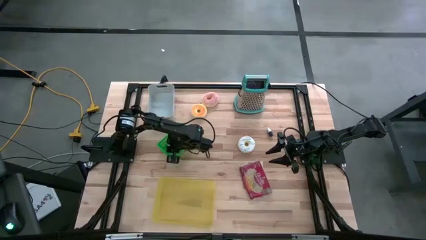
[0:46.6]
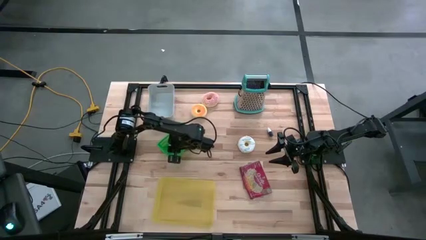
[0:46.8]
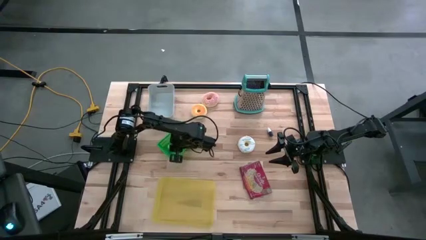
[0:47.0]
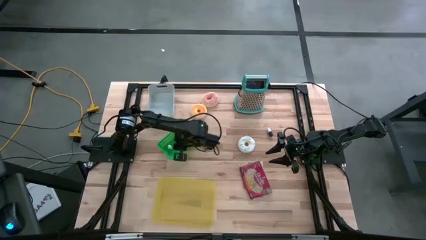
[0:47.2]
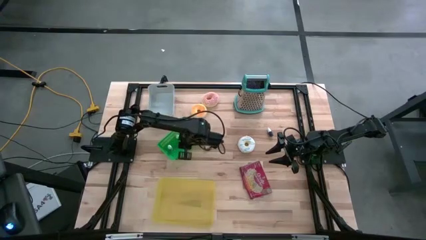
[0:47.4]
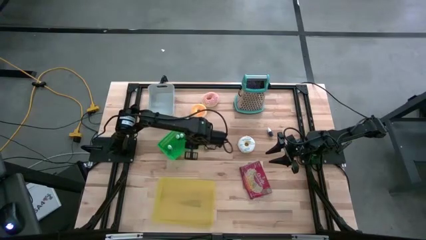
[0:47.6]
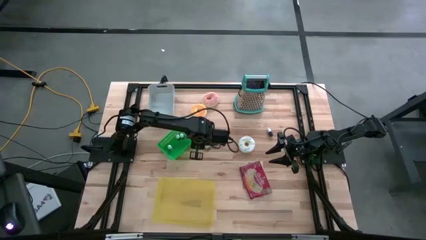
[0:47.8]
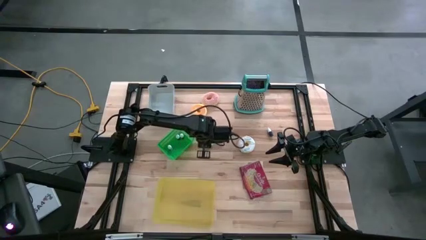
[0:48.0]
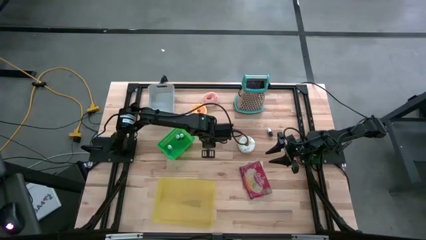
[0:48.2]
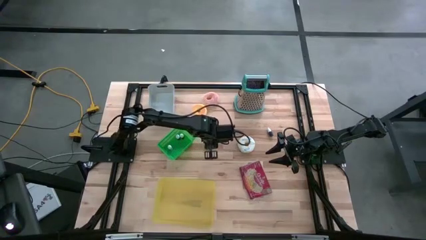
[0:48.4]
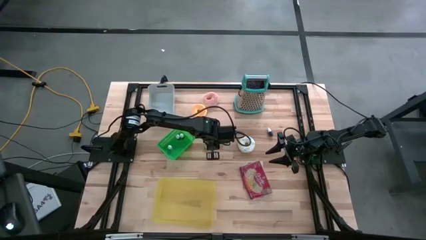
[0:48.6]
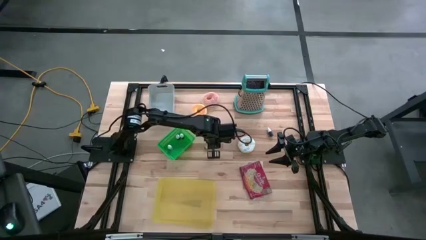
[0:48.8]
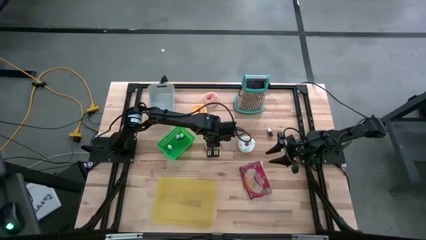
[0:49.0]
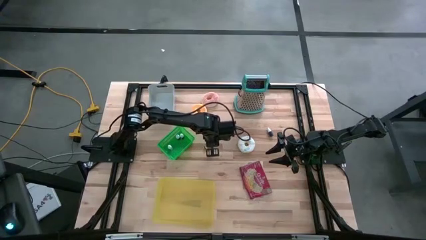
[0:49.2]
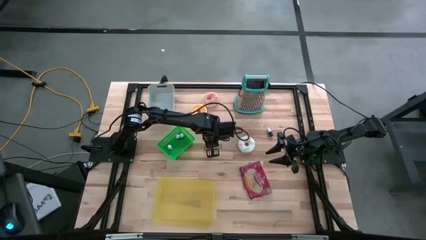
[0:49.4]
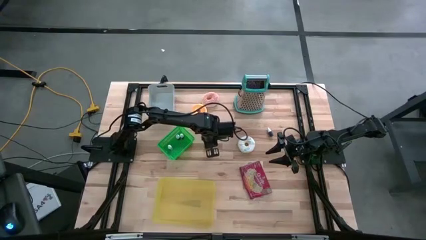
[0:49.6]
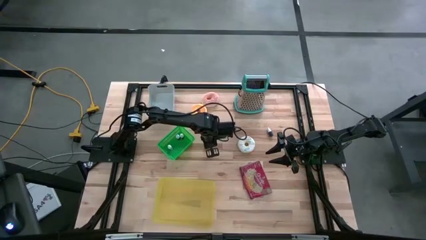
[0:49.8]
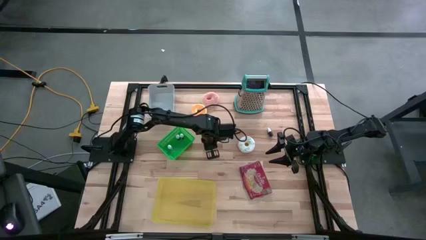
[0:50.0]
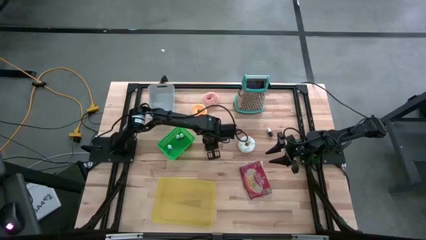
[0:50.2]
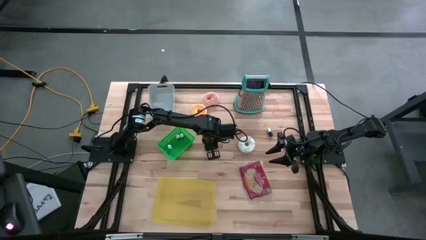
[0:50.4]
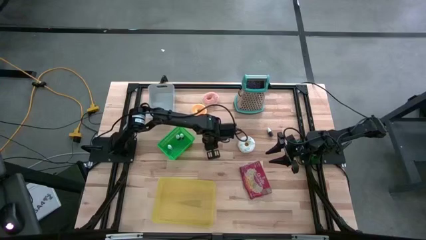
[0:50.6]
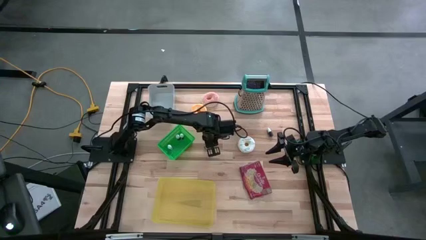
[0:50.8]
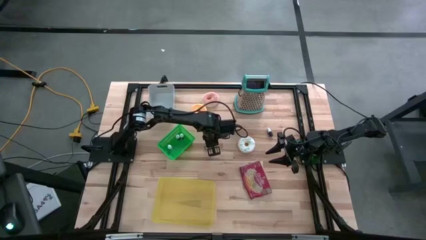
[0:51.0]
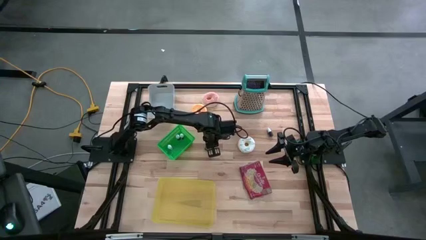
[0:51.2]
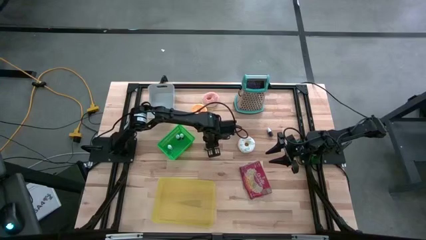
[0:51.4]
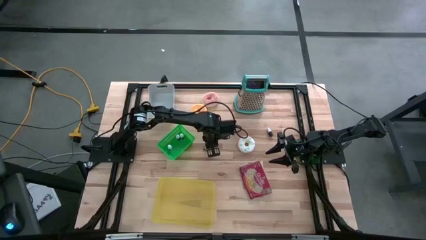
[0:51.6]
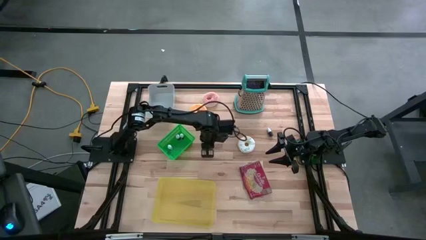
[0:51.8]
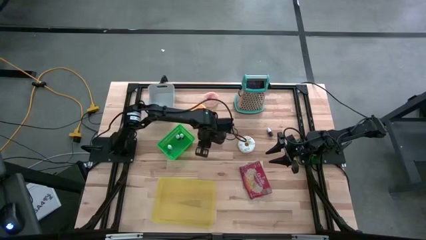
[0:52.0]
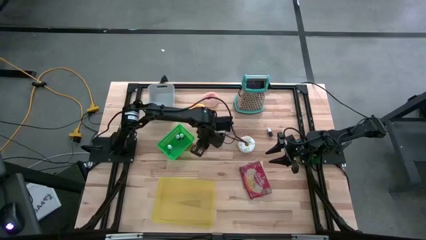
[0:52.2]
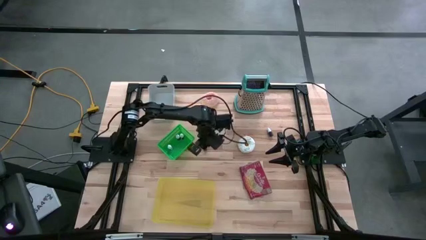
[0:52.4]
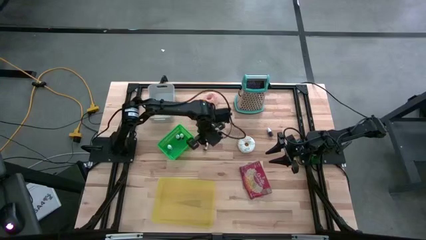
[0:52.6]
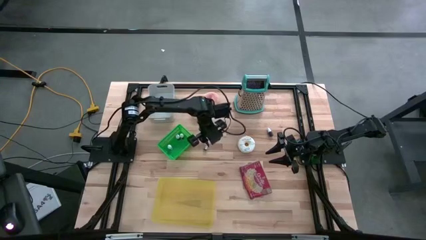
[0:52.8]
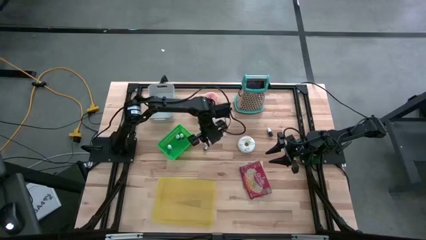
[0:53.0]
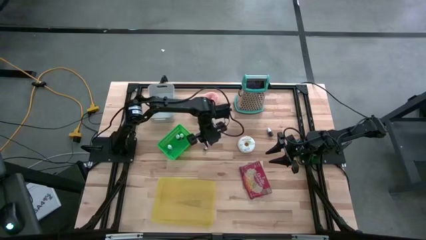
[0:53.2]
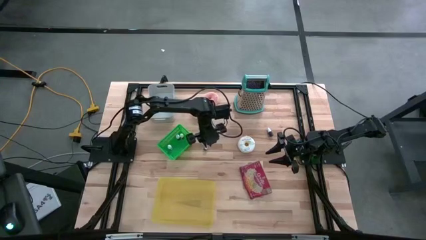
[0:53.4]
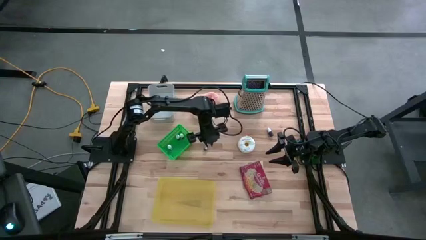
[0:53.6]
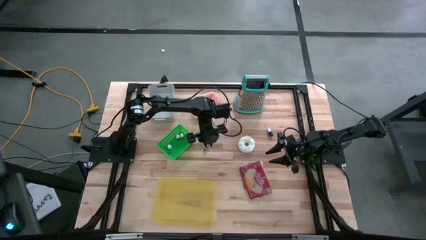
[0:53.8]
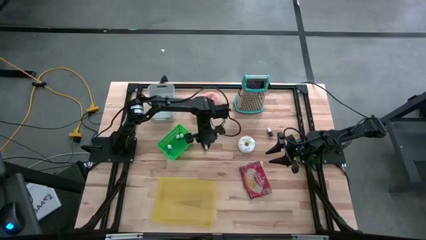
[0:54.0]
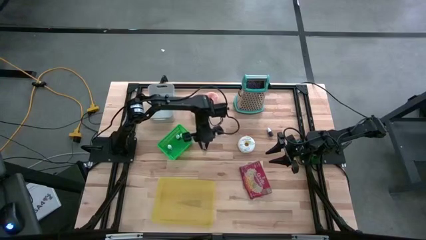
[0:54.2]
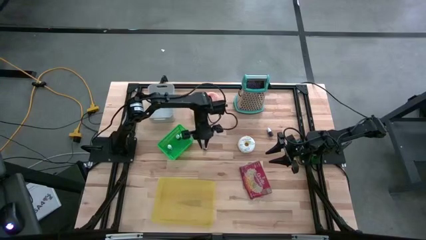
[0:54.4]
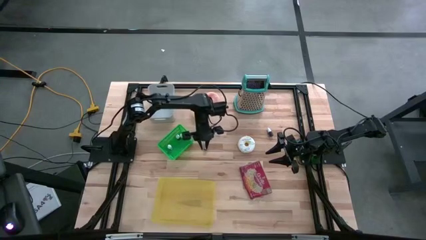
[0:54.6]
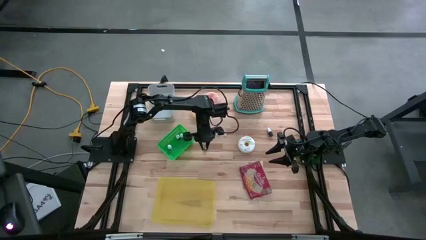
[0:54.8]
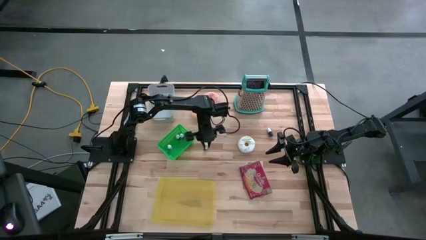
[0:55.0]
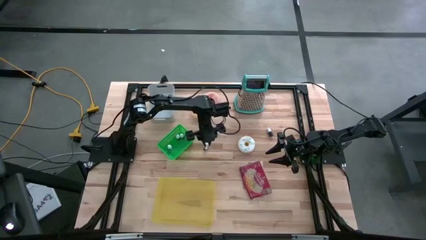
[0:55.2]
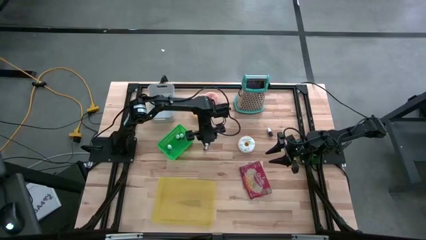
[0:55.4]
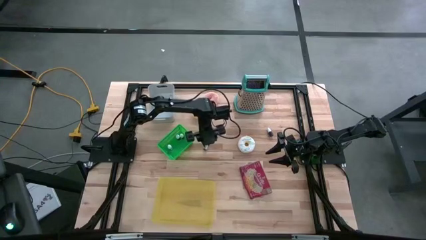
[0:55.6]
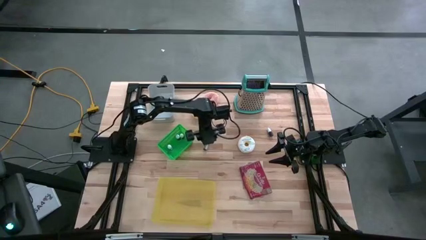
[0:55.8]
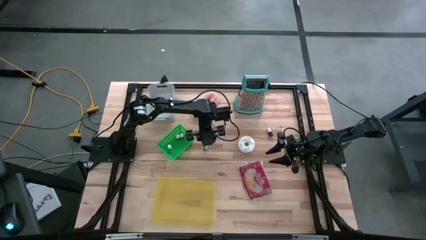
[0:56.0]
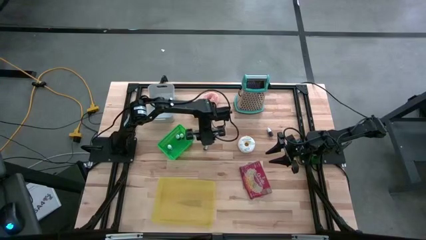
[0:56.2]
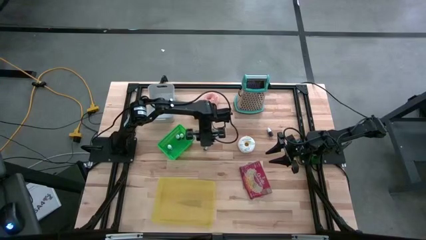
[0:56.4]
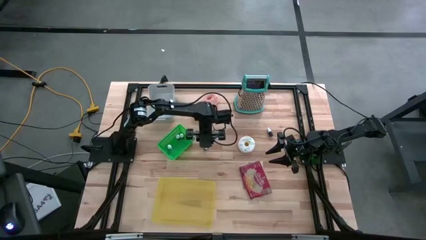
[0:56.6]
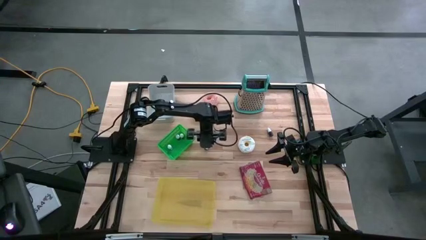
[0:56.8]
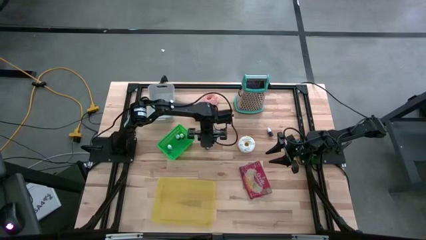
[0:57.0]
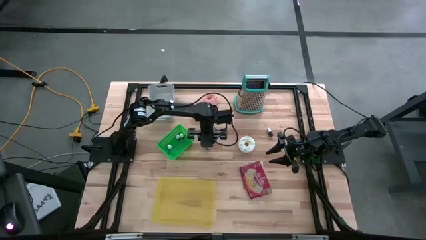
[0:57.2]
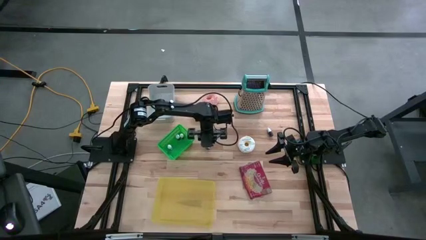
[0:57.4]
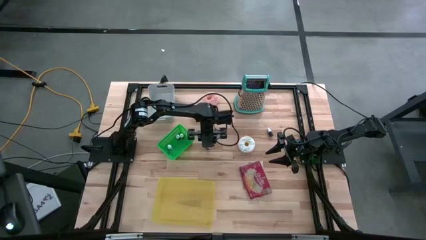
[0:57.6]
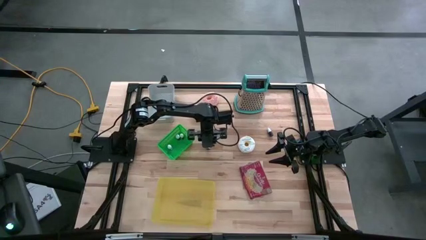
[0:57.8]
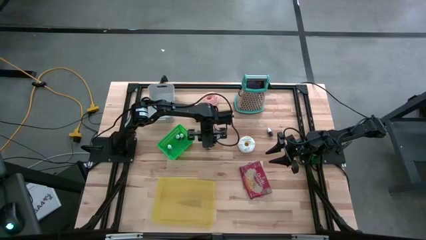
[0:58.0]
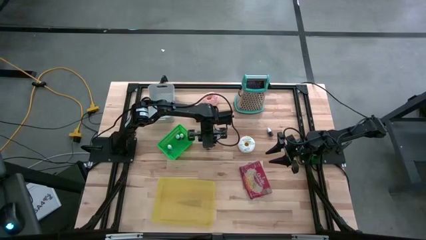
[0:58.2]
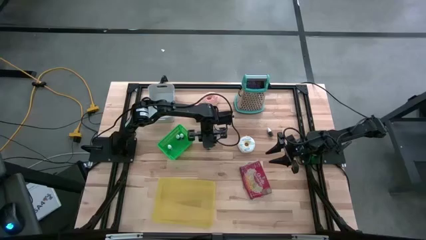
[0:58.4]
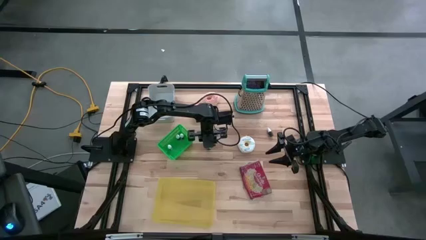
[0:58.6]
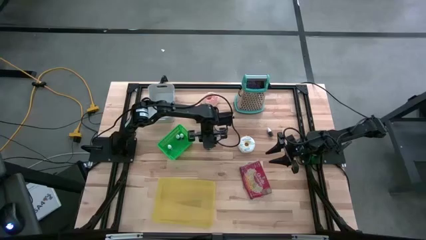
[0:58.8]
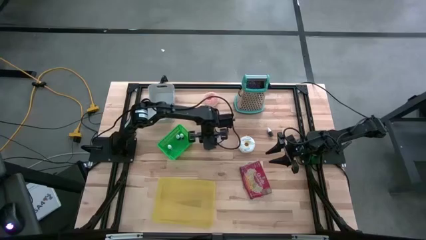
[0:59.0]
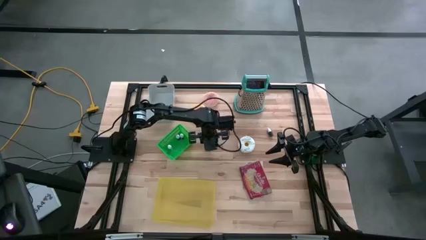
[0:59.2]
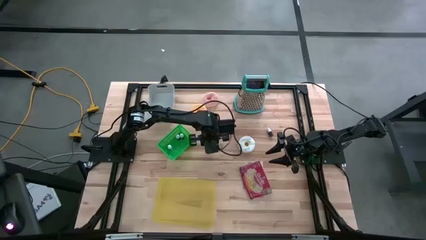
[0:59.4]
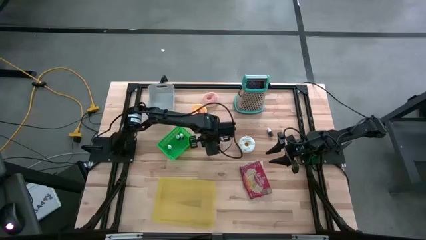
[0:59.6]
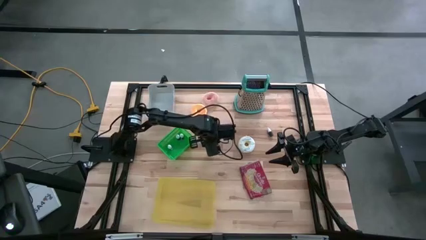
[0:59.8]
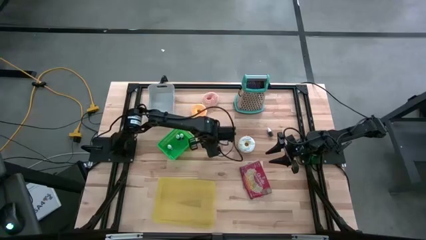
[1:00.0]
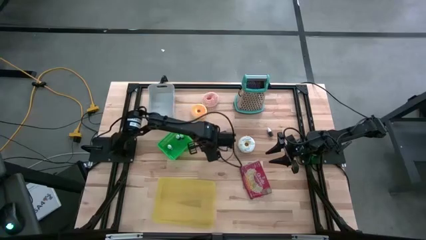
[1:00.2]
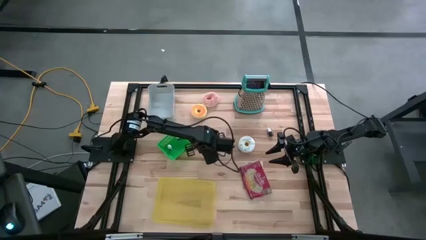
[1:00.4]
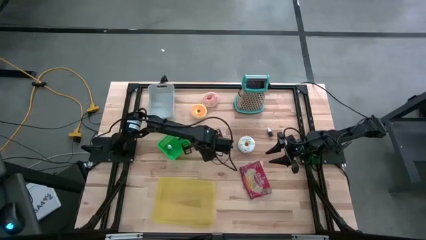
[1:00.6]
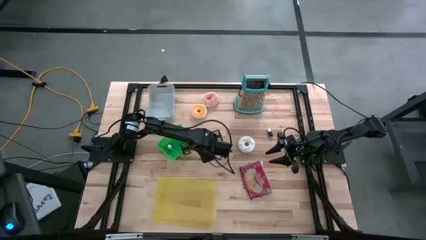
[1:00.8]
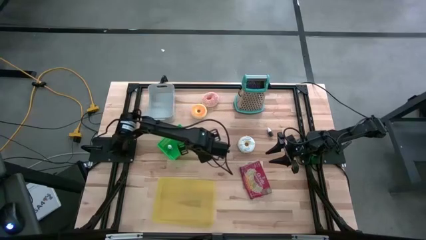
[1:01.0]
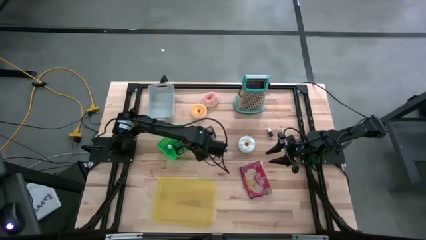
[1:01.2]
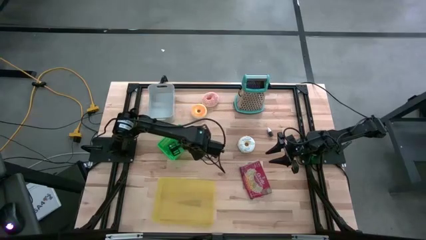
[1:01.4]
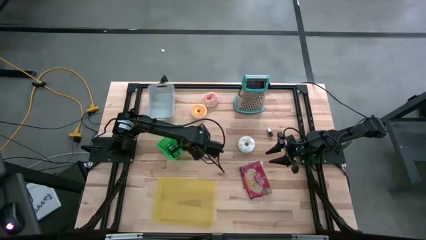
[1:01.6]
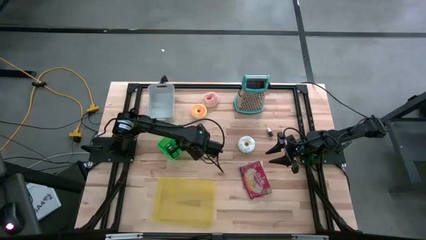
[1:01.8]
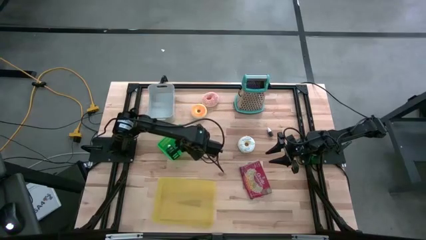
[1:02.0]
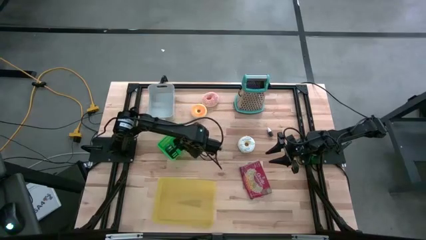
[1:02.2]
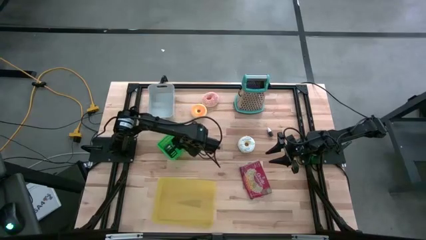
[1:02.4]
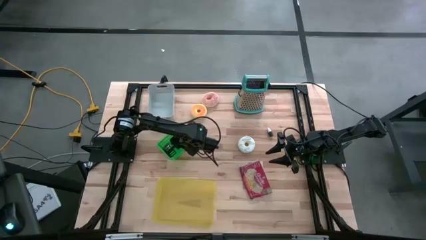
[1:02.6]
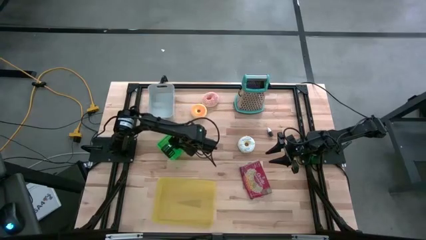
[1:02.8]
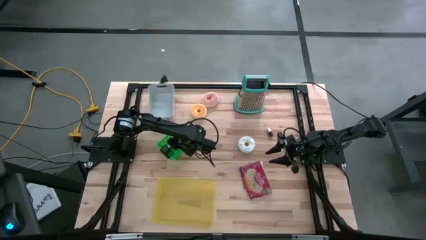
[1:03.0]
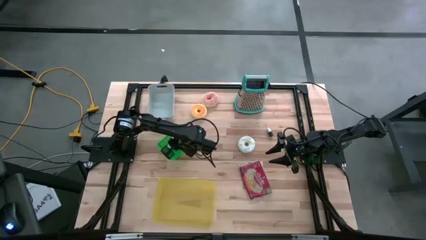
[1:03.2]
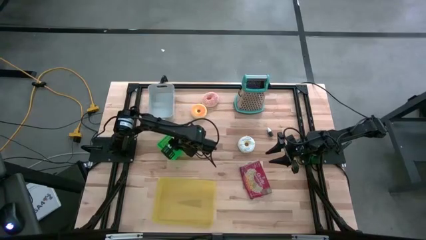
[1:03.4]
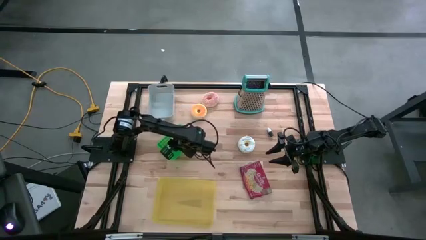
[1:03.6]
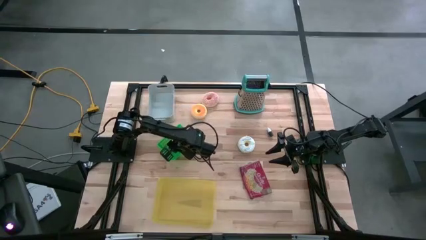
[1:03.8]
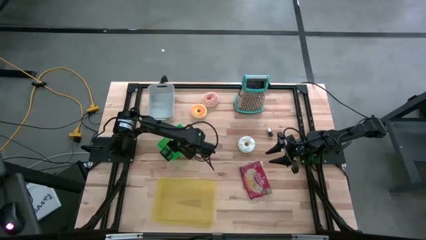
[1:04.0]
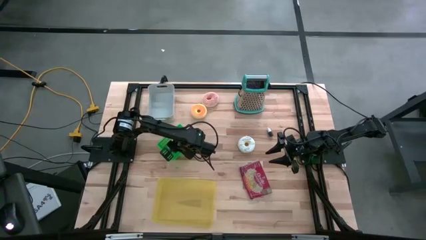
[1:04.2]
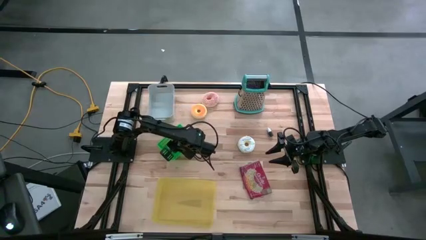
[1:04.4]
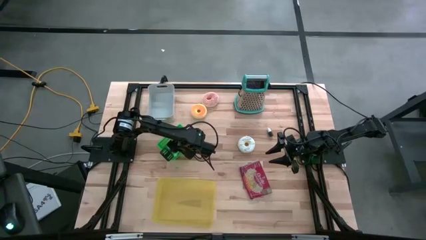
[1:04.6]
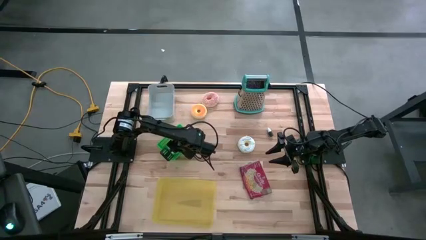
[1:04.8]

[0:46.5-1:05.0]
Put the green bottle into the green basket
